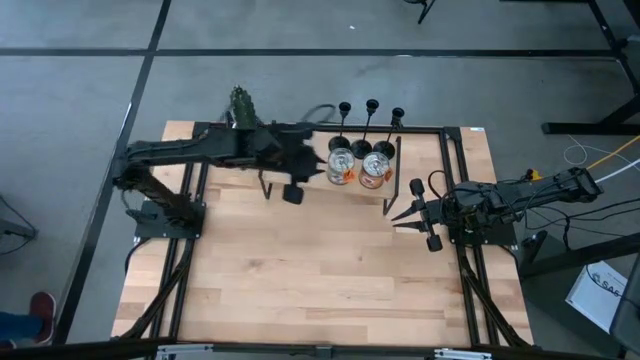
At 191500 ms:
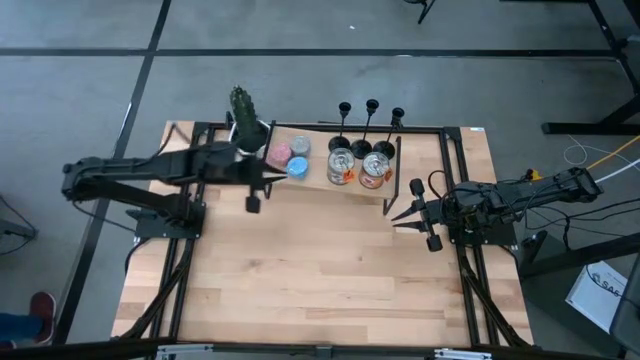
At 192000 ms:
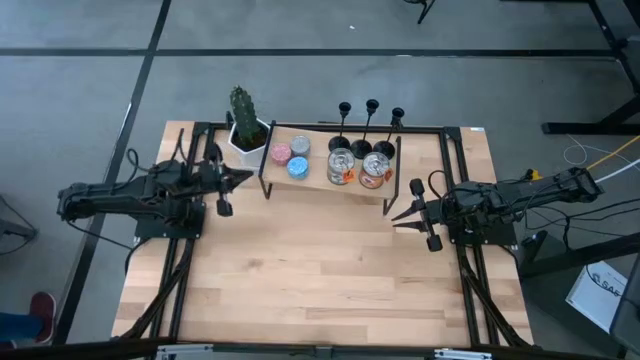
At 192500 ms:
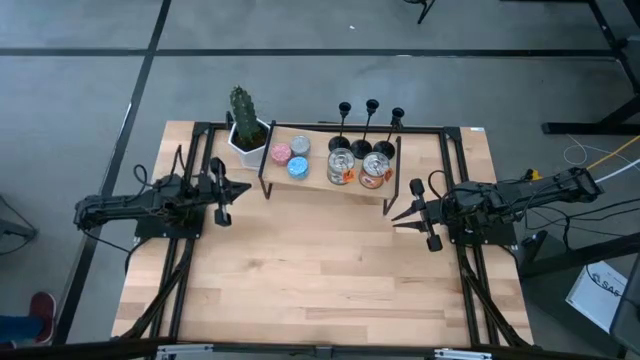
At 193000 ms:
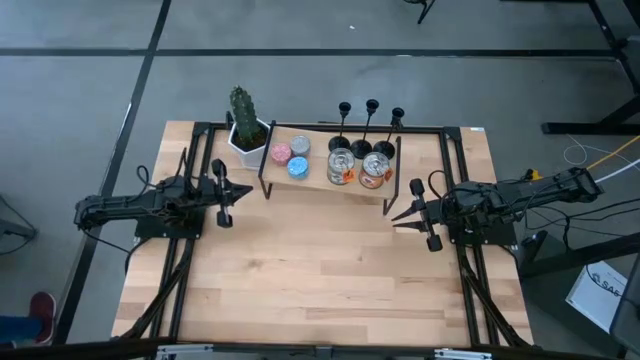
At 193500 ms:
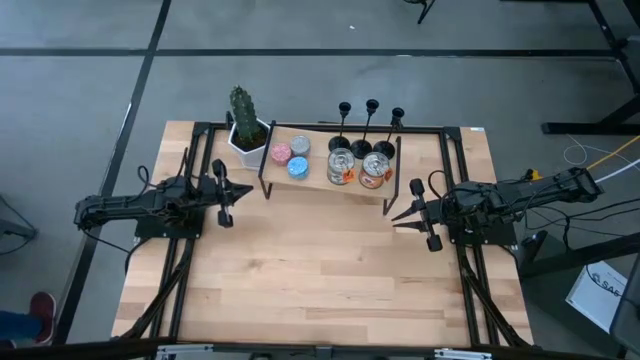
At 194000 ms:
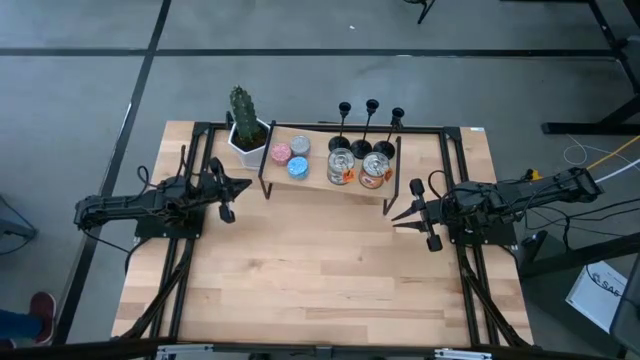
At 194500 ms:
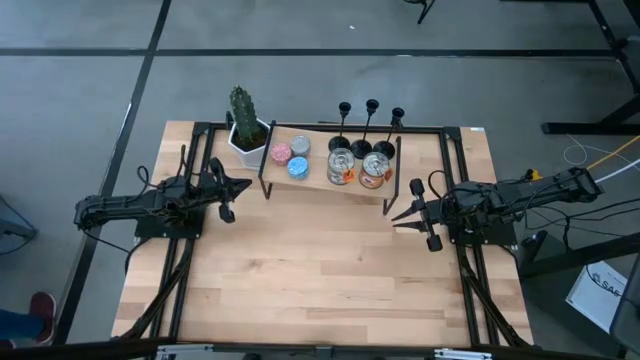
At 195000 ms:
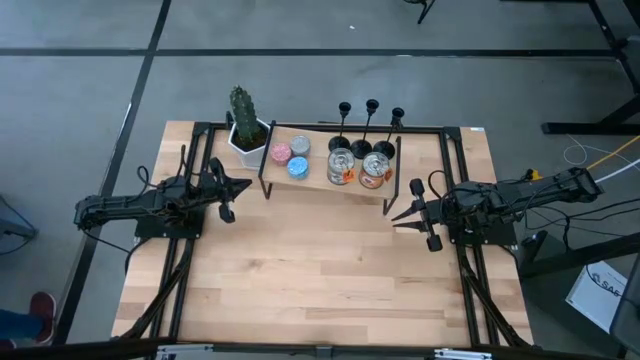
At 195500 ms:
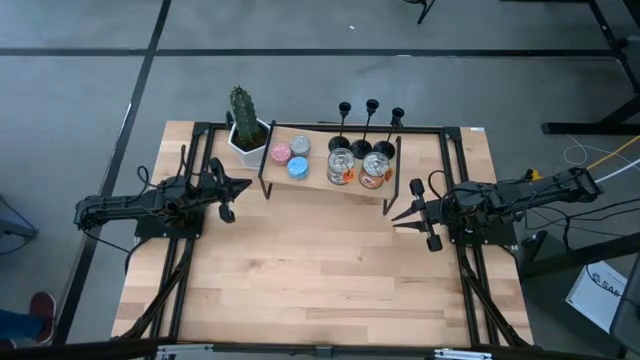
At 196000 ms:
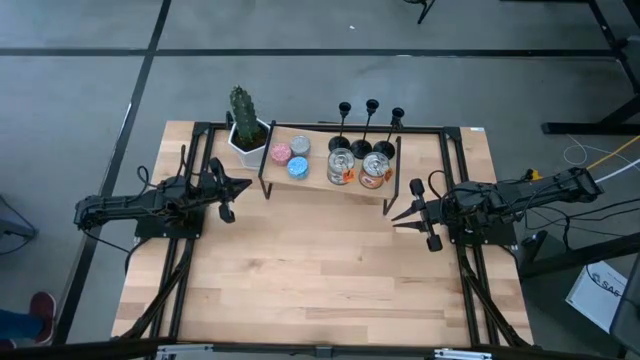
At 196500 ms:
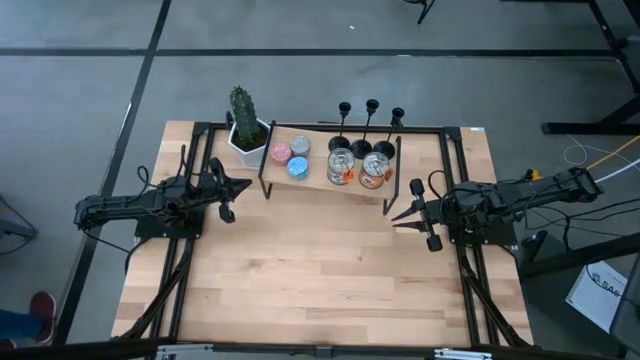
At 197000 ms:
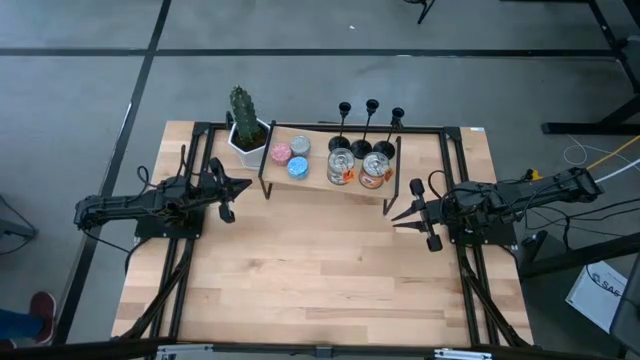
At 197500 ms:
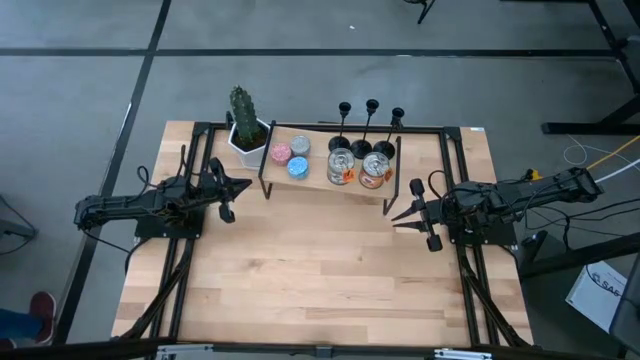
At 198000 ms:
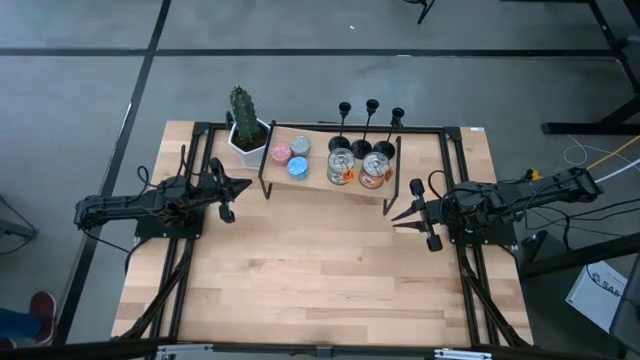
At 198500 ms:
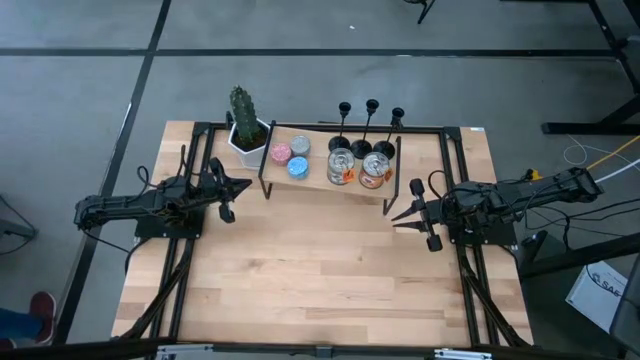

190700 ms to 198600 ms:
Task: Pick & Place candle stick holders
Return to Home Position

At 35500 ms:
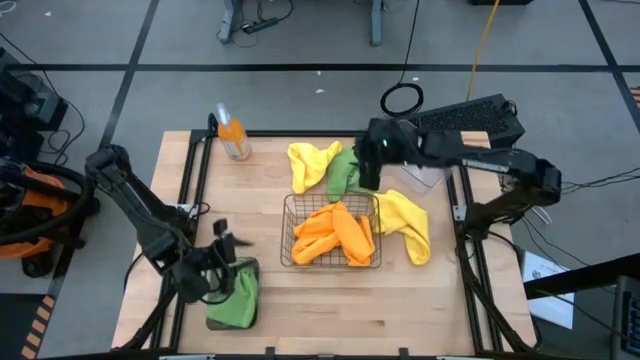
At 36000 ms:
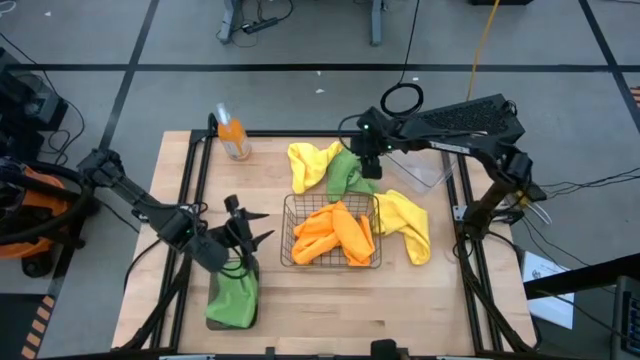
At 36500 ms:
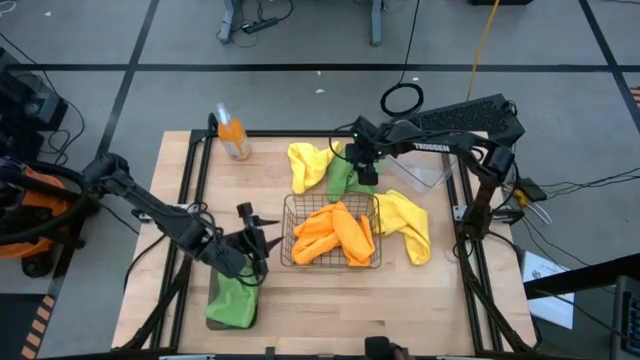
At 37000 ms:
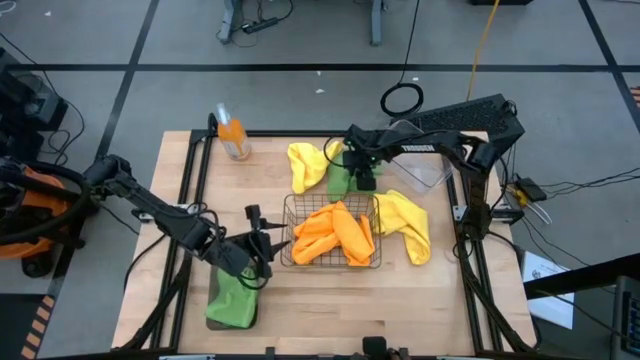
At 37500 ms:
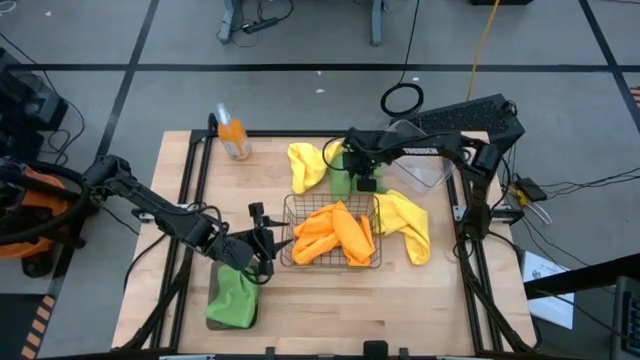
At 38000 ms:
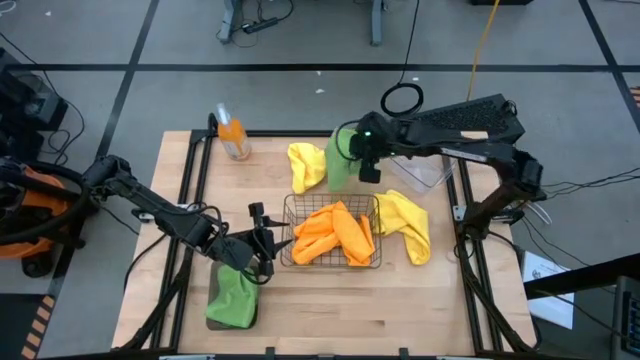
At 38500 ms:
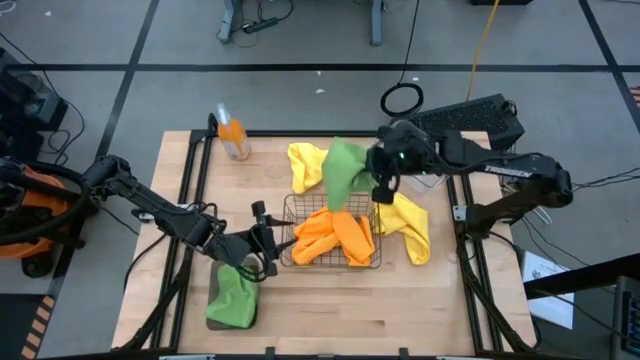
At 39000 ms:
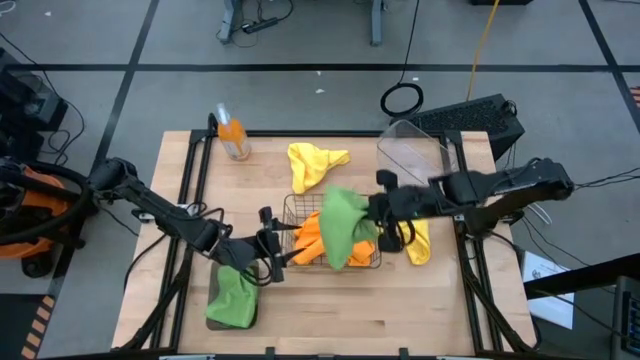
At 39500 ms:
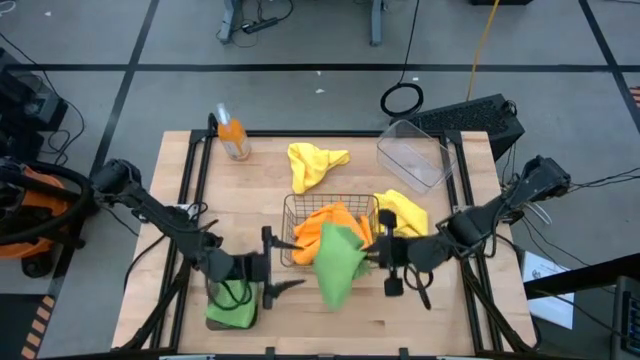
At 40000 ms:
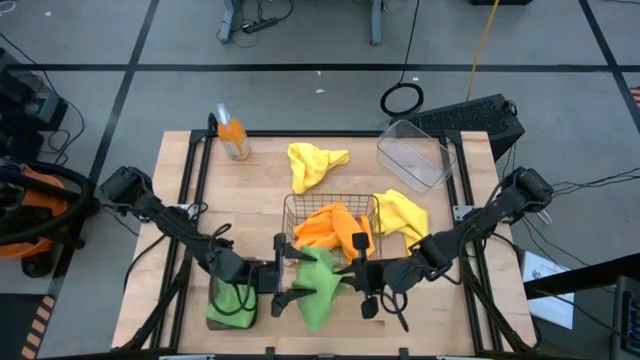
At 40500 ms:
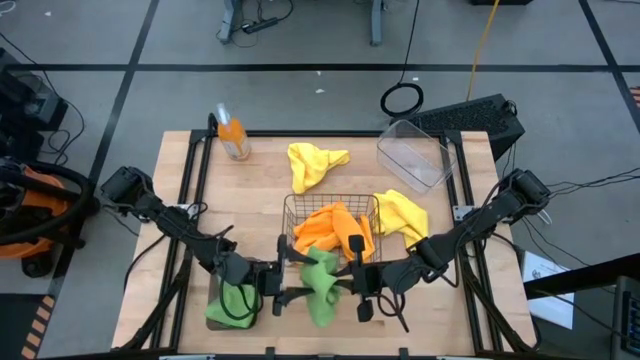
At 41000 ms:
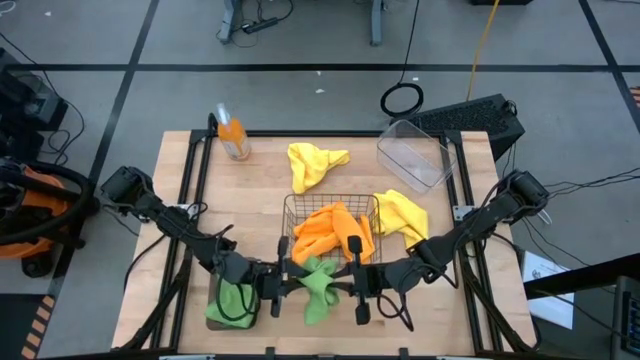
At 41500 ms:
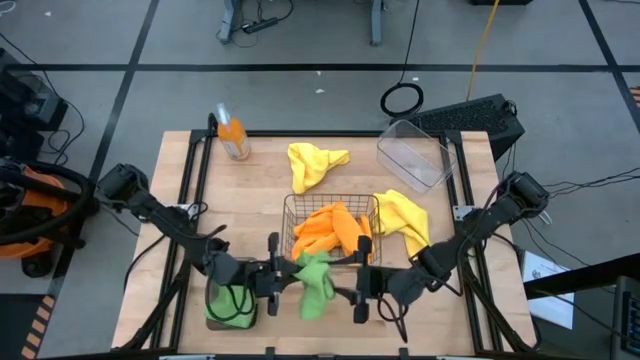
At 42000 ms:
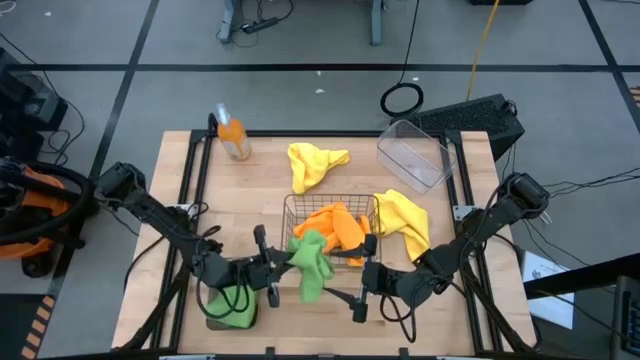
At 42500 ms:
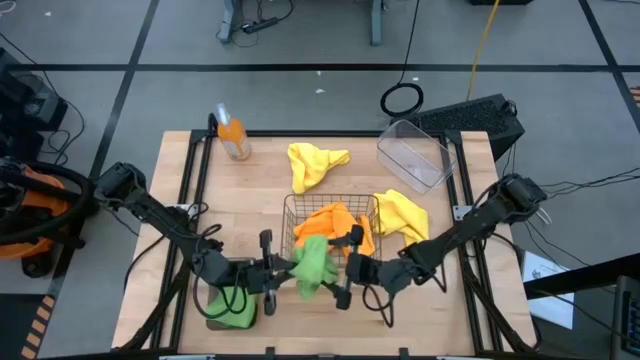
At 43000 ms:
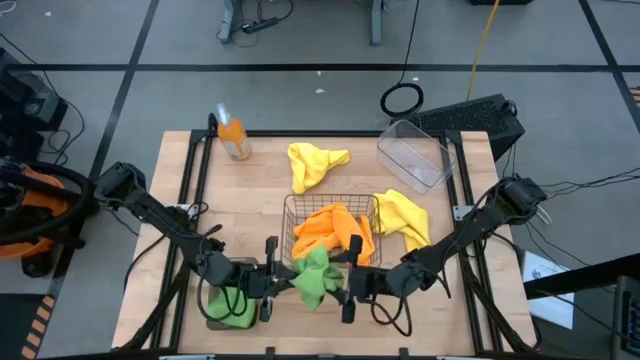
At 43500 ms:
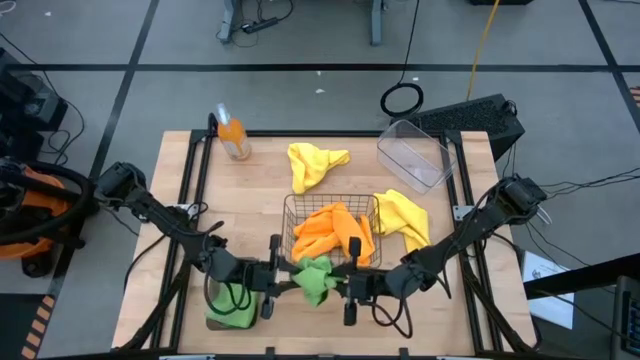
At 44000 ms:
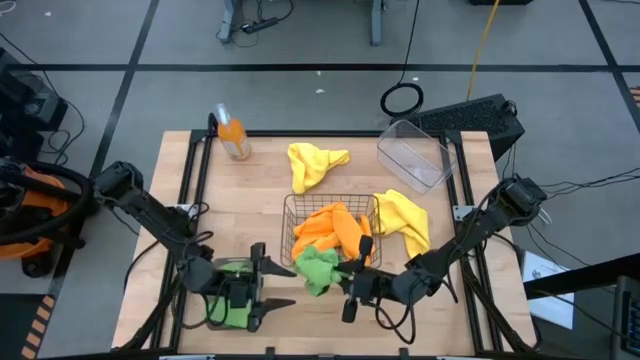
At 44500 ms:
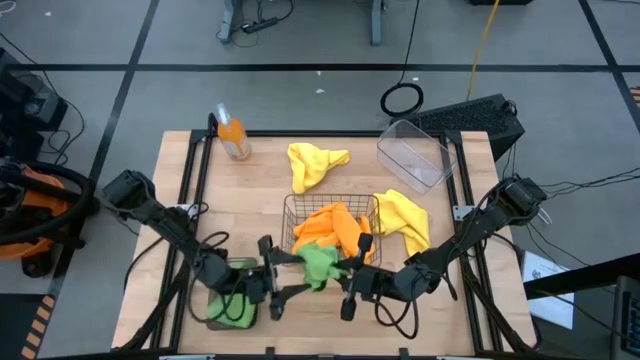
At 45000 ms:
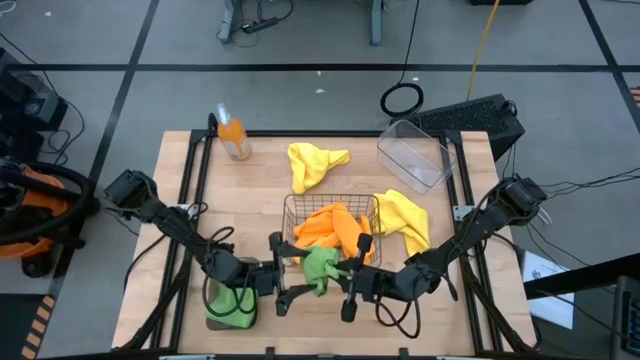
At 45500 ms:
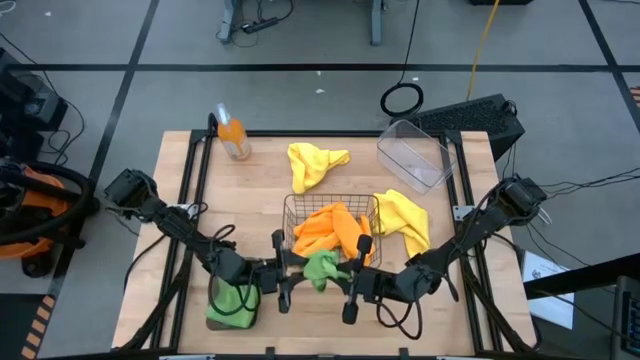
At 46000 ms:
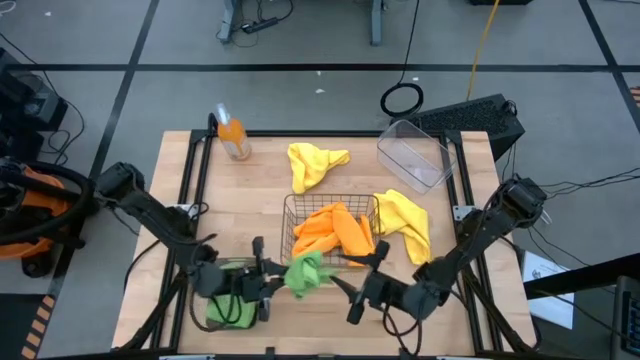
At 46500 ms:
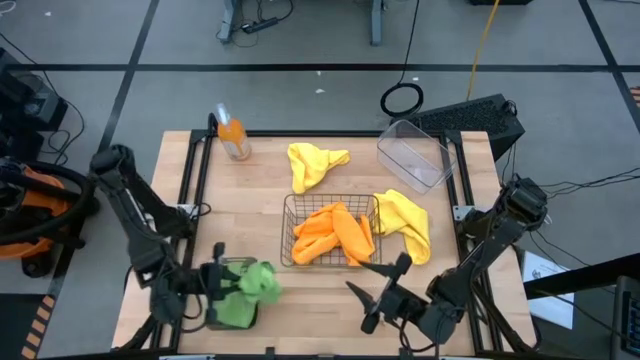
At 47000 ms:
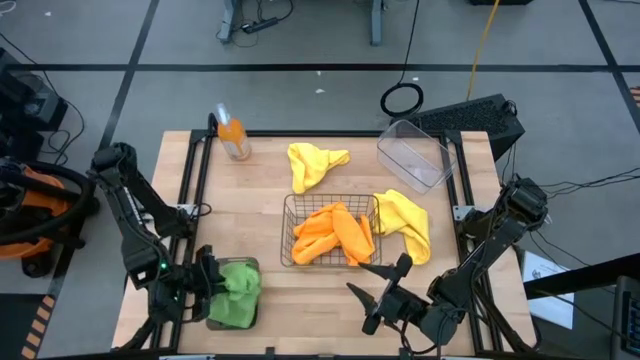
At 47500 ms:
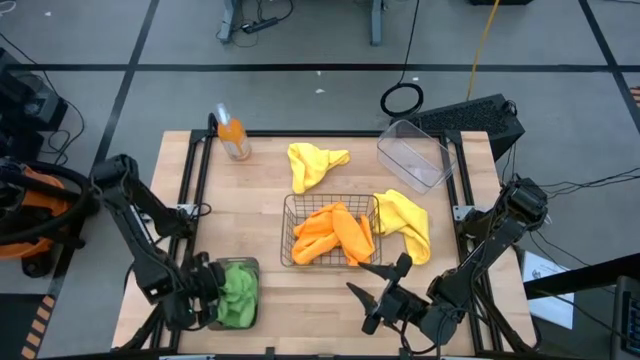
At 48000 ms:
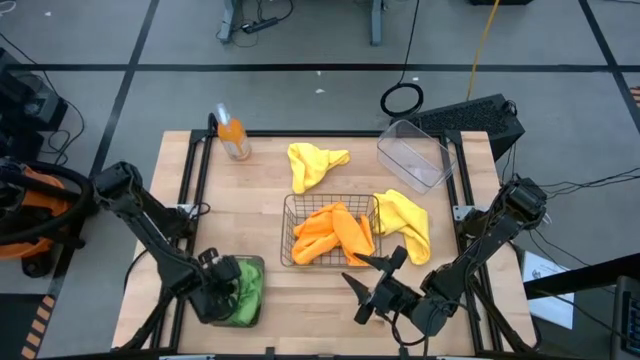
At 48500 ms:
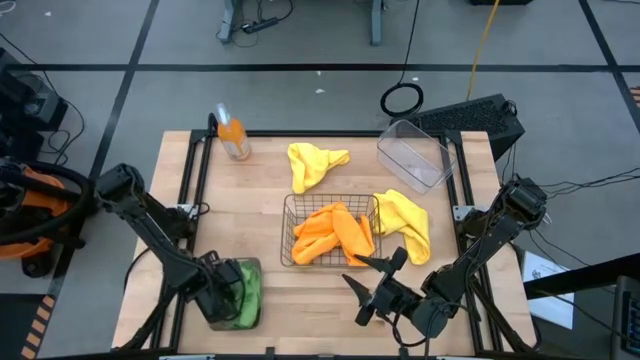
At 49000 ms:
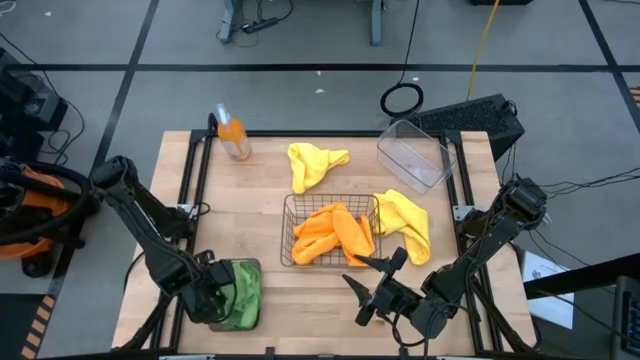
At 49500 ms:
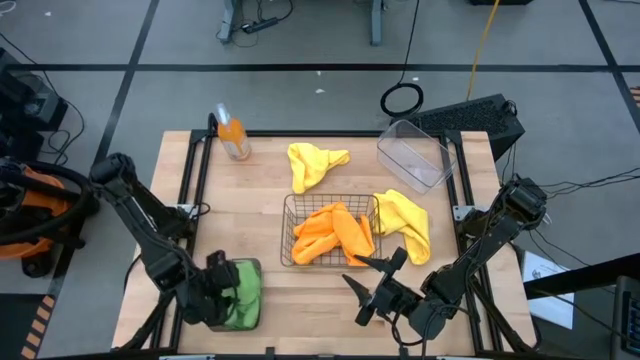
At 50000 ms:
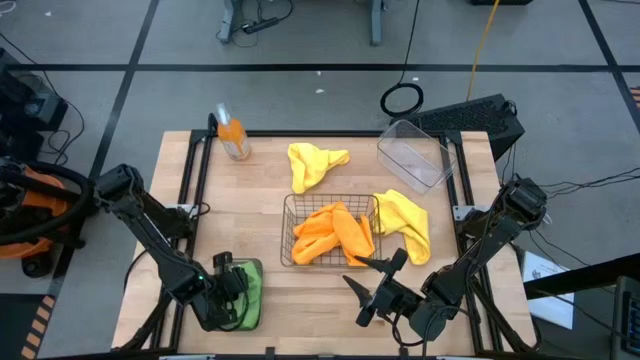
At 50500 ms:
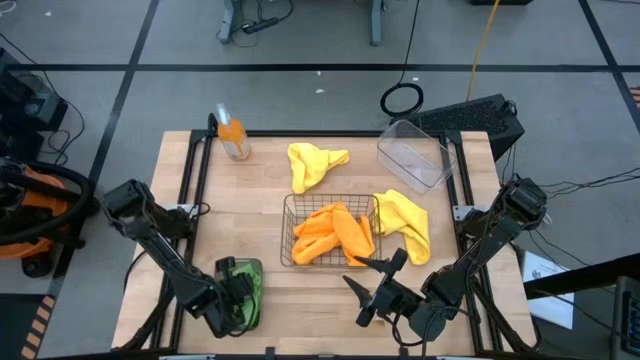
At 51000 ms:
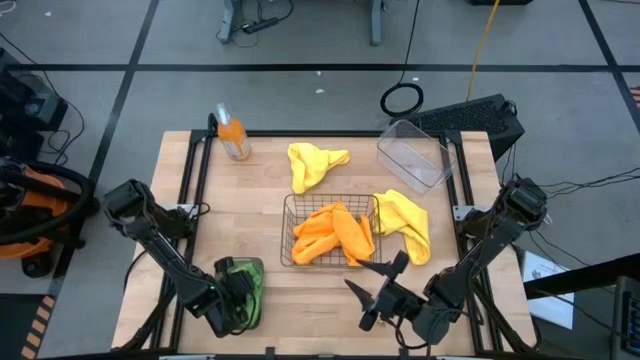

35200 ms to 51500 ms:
Task: Sort microfiber towel by color & place in baskets
Put the green microfiber towel into the gray transparent bin
